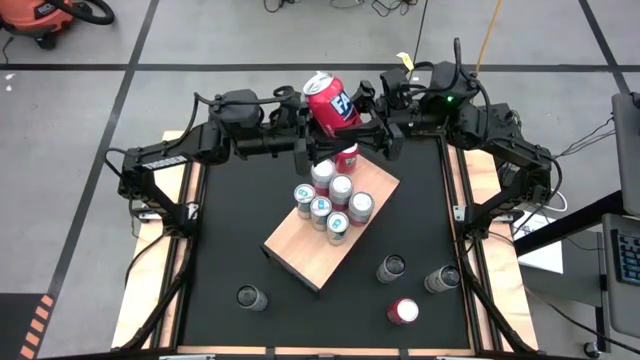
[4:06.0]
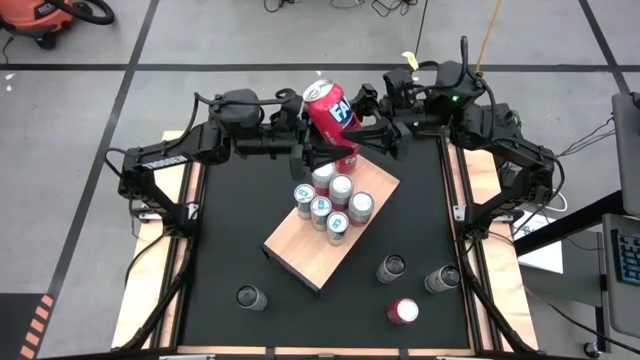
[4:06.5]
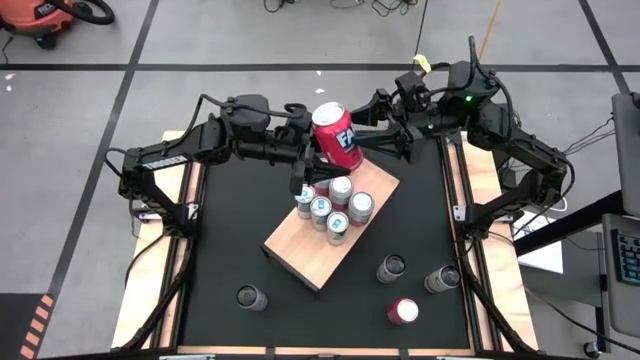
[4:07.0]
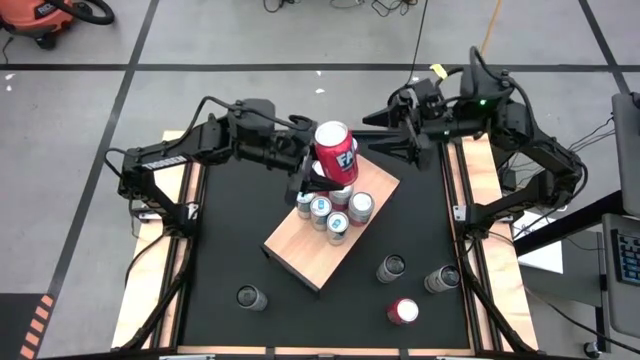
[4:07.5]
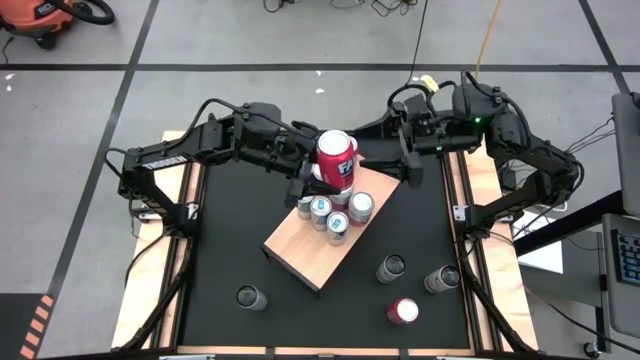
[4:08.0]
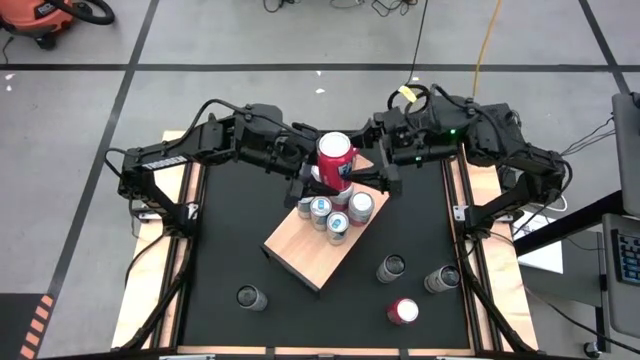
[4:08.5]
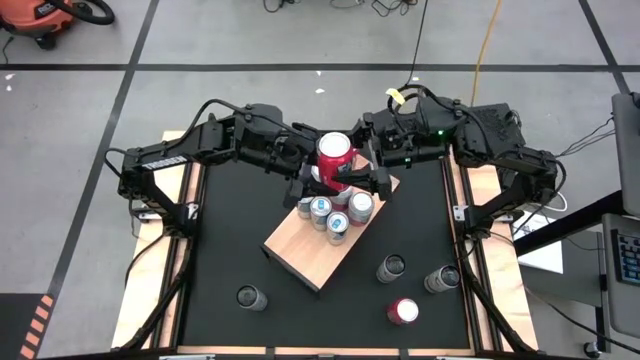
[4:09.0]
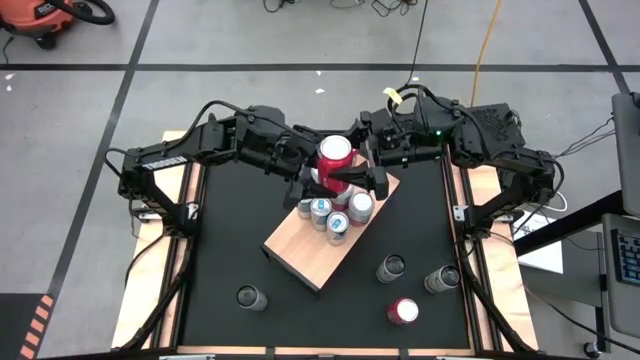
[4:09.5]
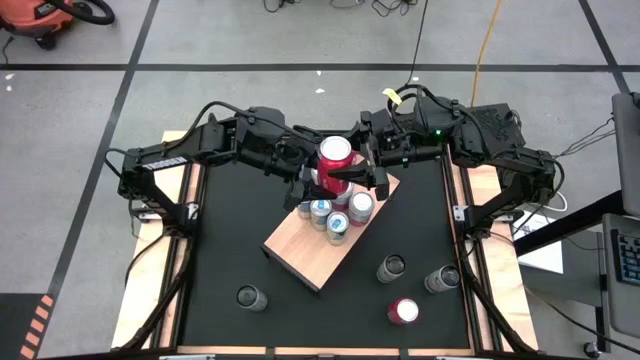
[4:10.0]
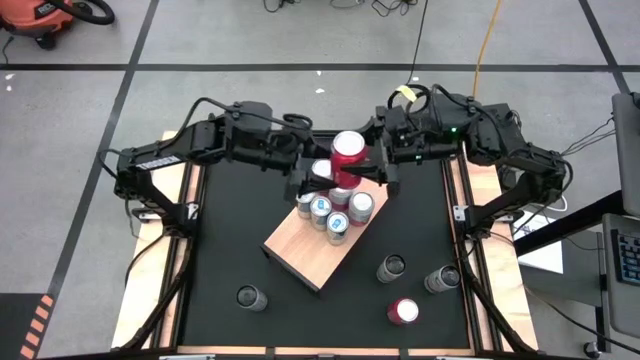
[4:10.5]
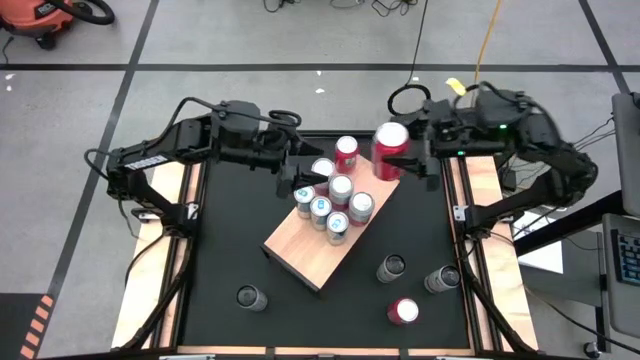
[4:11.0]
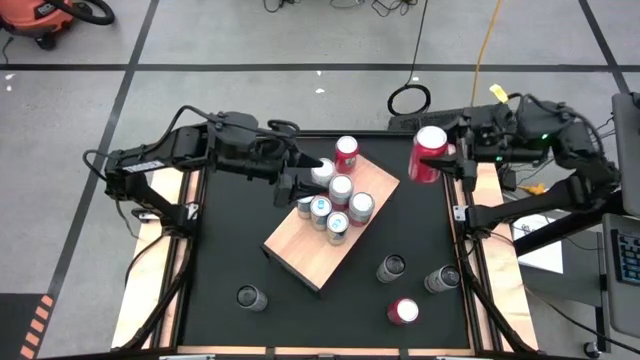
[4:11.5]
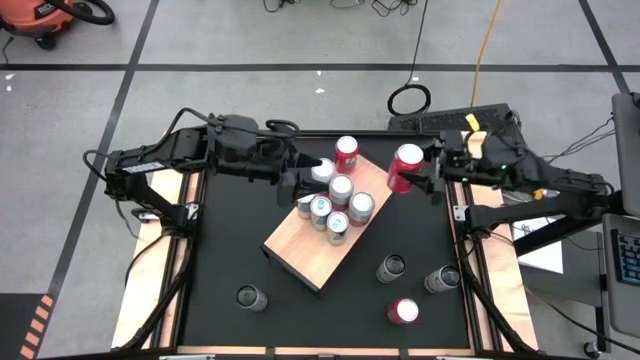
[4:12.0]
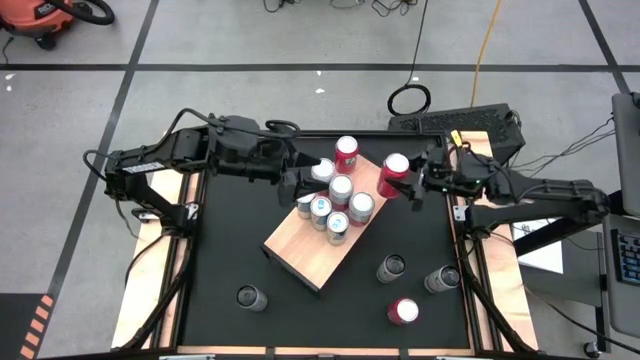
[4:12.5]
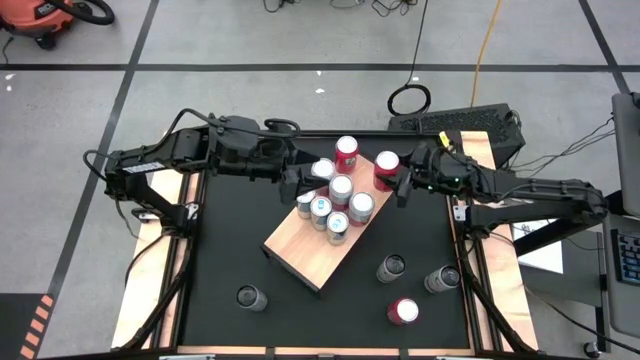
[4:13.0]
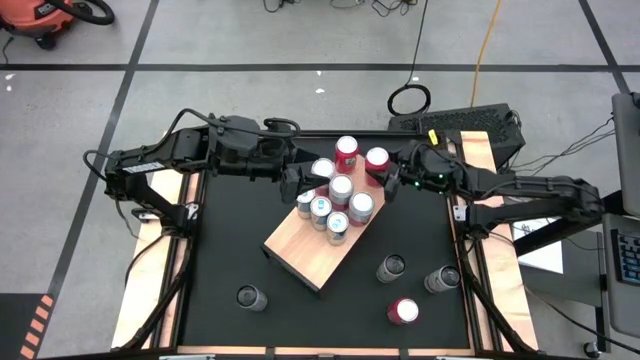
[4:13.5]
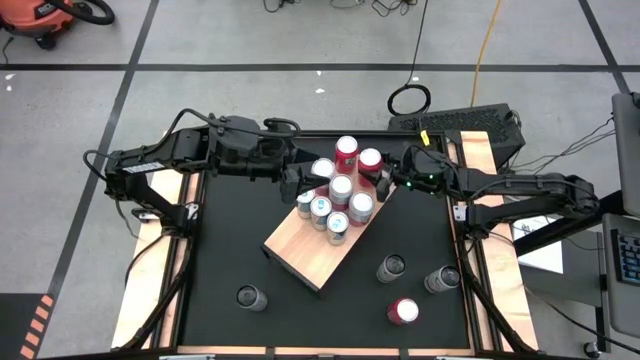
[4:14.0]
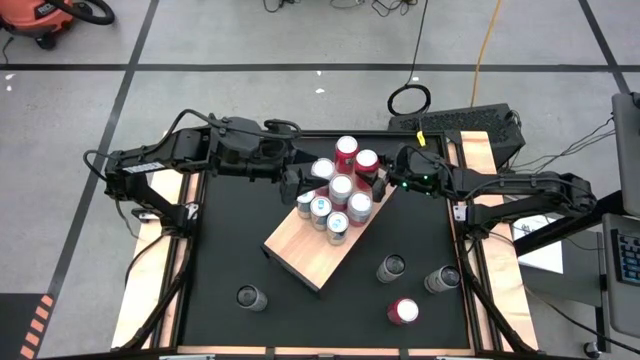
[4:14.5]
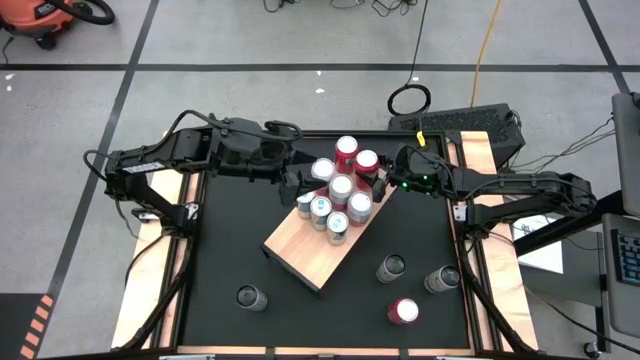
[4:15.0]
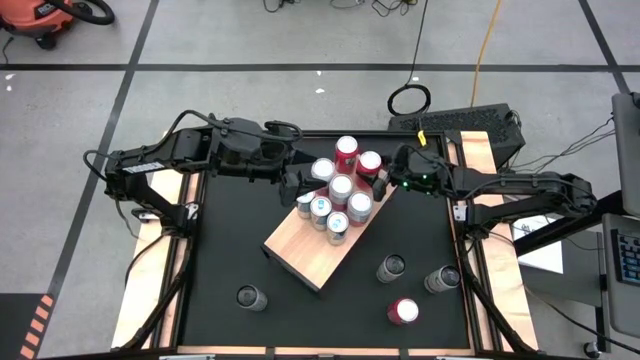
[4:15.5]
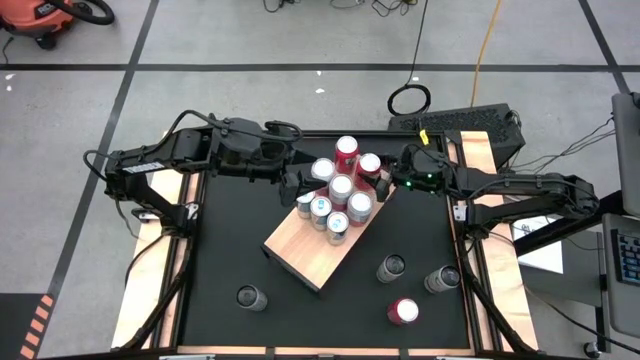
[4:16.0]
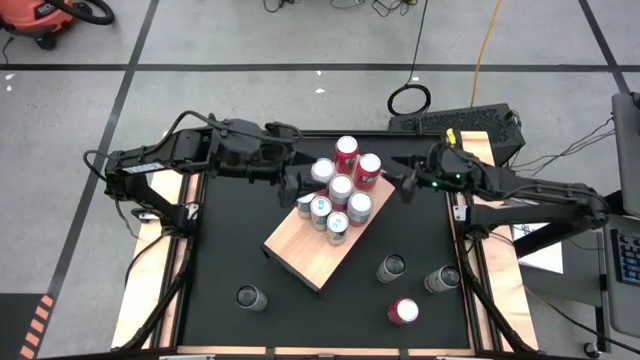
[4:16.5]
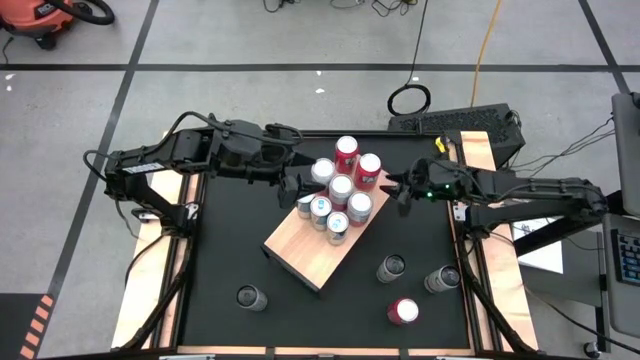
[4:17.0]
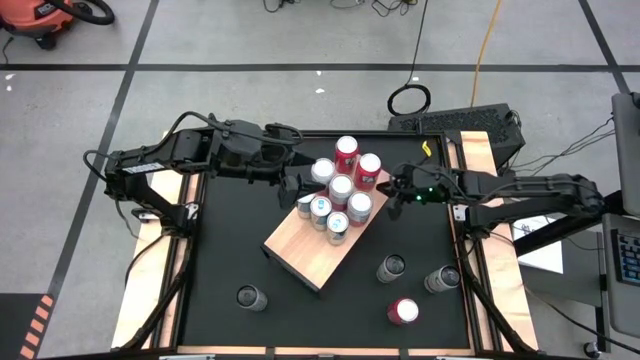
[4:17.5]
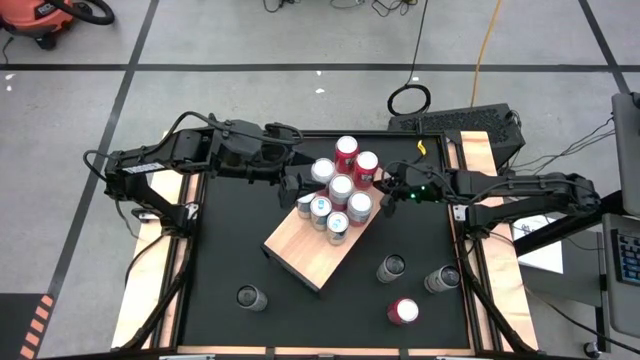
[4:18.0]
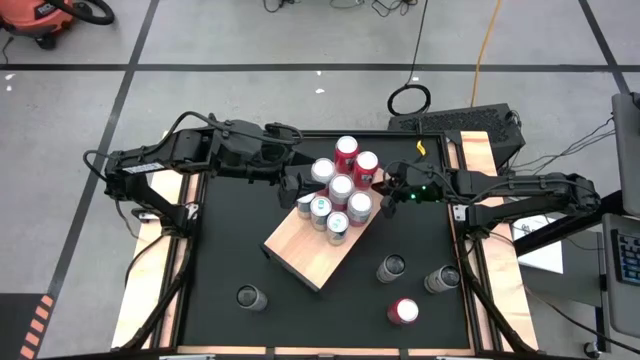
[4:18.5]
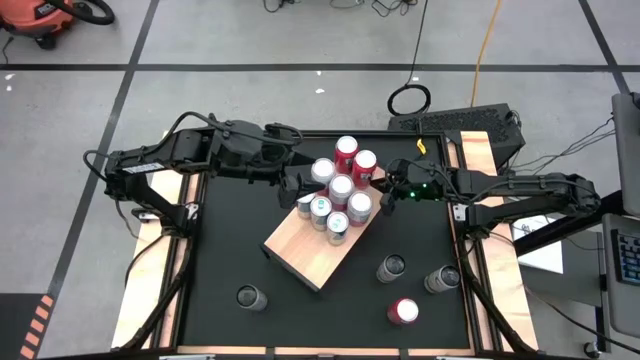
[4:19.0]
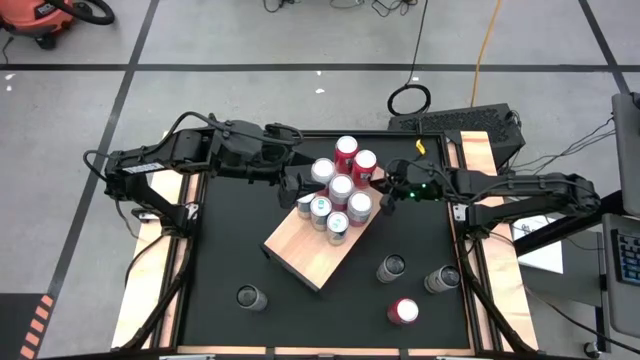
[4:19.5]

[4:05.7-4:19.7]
Task: Place canned beverage on shelf
Put the top red soda can on the shelf aligned with the red soda can

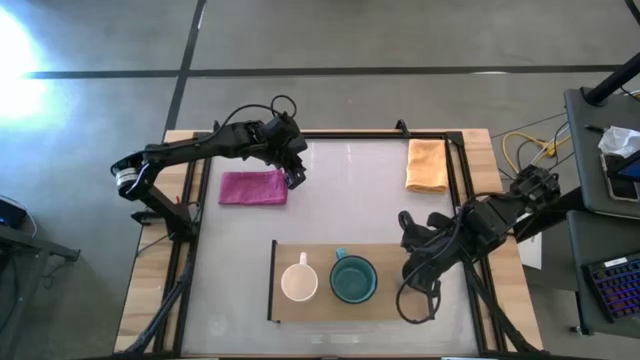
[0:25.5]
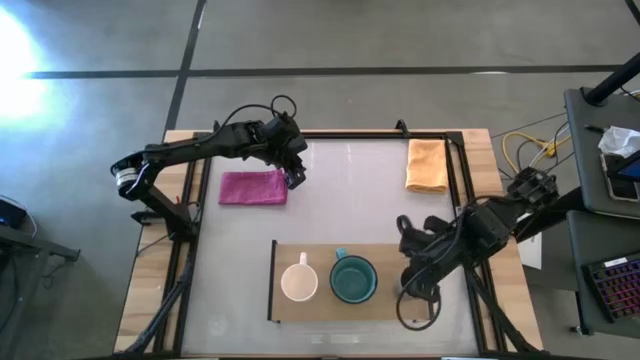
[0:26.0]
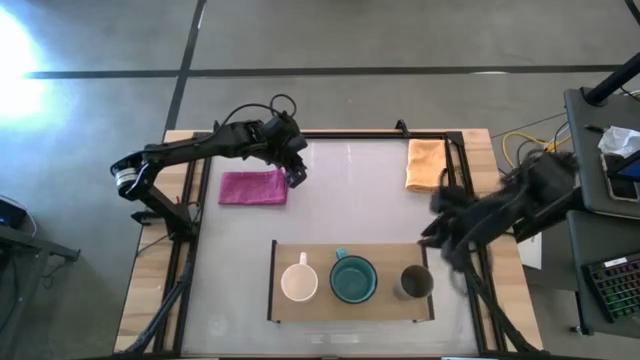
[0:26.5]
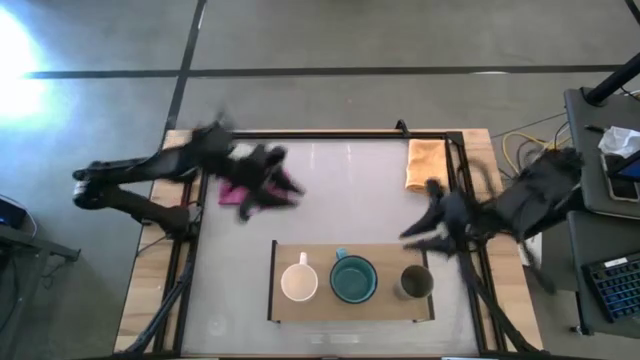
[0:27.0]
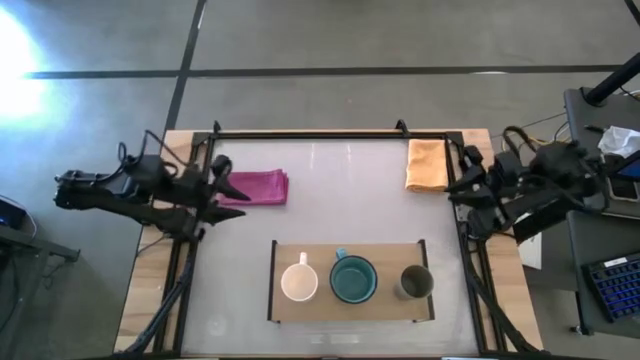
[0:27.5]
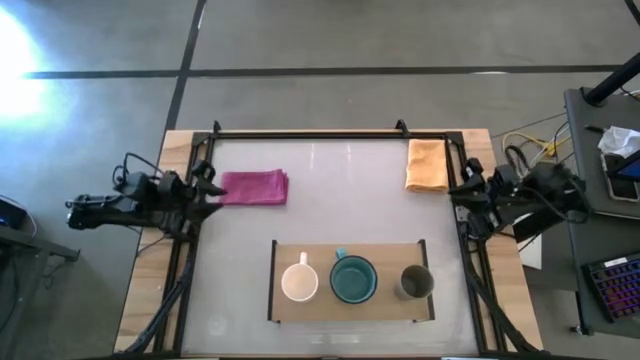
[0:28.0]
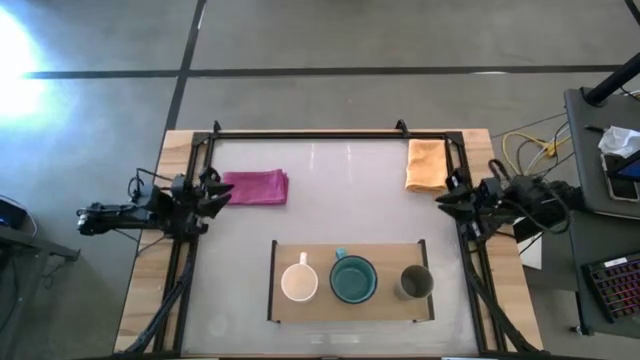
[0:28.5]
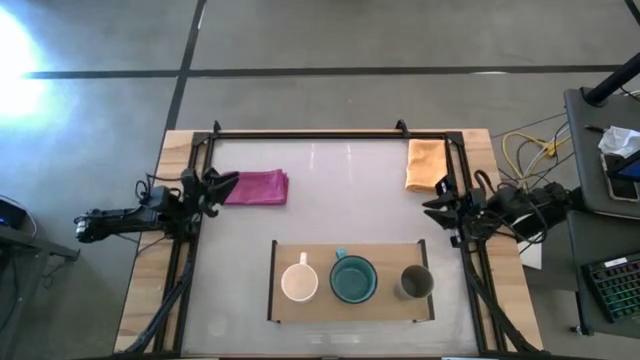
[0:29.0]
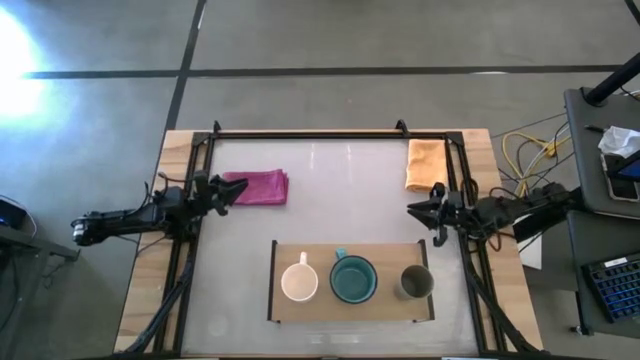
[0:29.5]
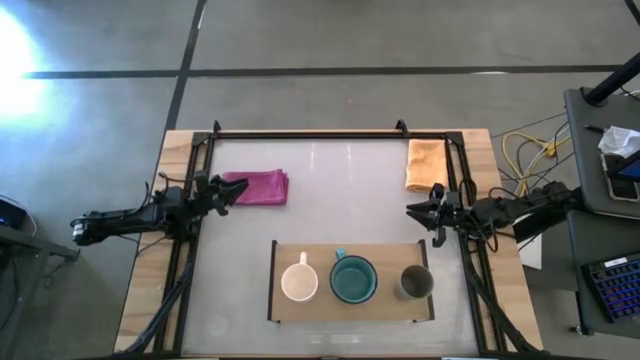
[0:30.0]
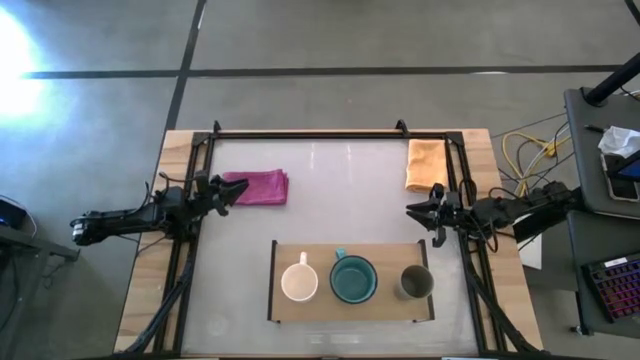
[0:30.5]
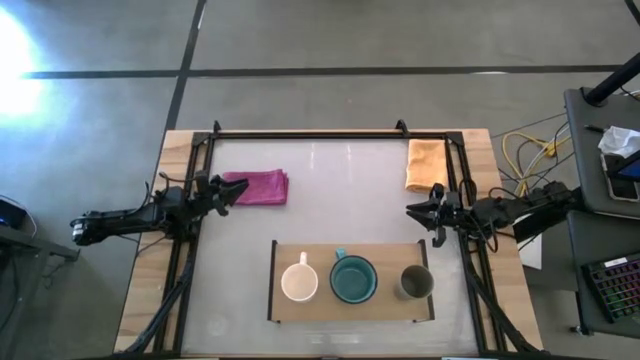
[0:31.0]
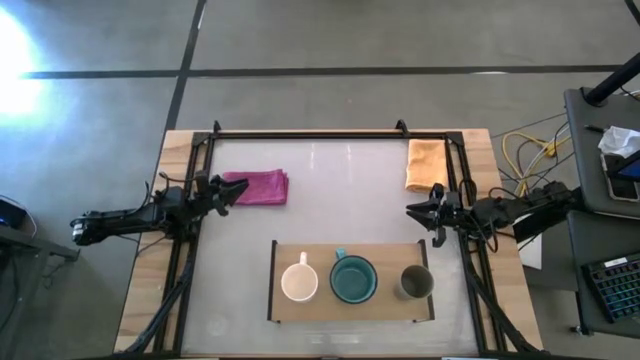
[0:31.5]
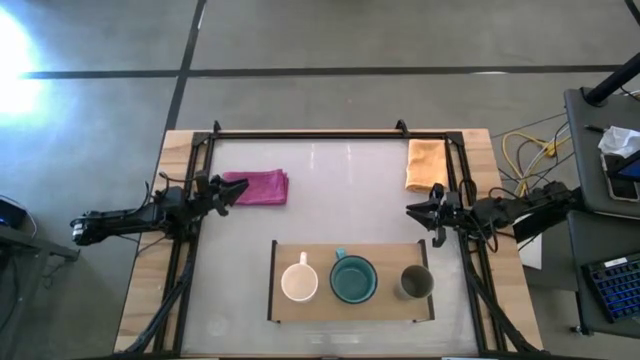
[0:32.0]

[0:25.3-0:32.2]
Task: Stack small to large cups/mugs on shelf
Return to Home Position
